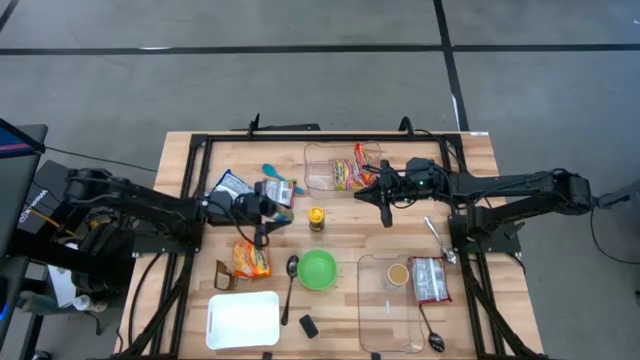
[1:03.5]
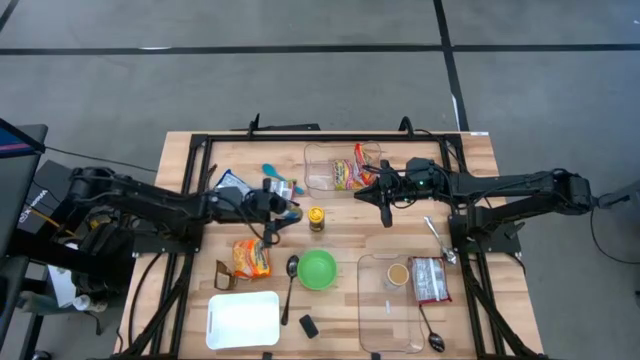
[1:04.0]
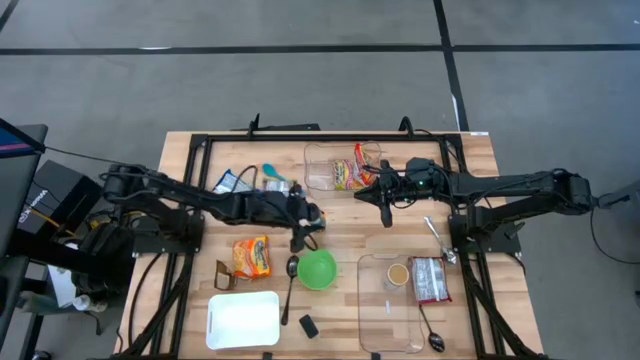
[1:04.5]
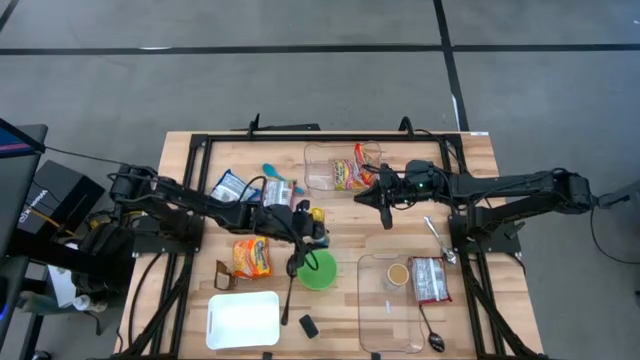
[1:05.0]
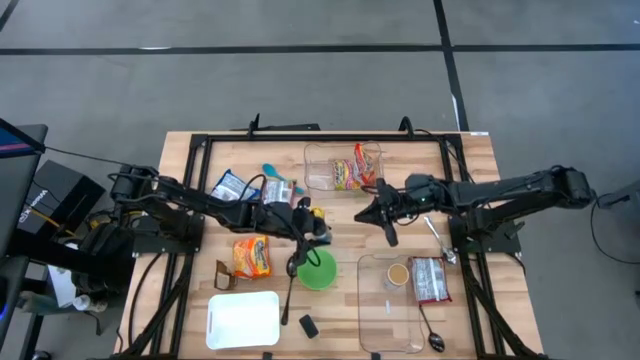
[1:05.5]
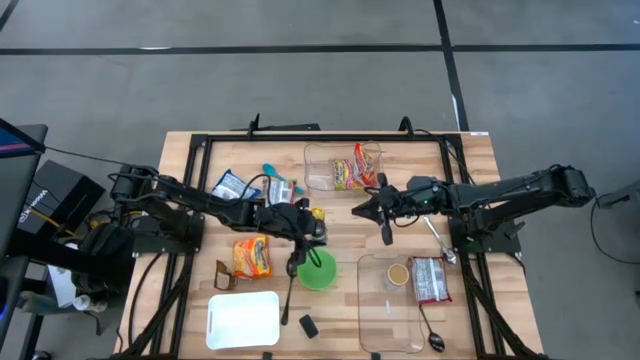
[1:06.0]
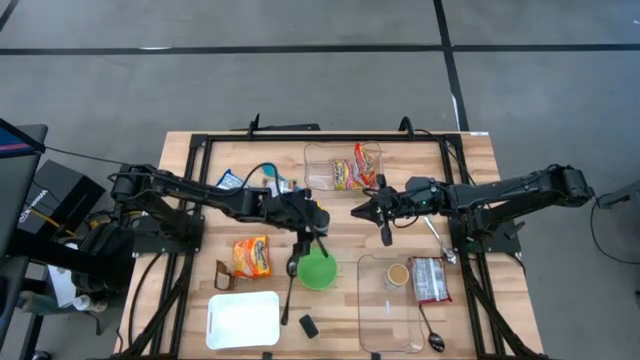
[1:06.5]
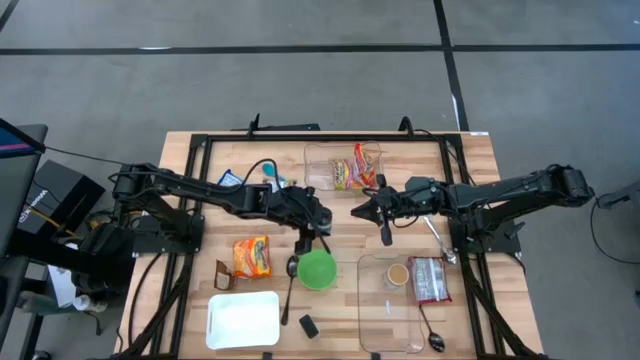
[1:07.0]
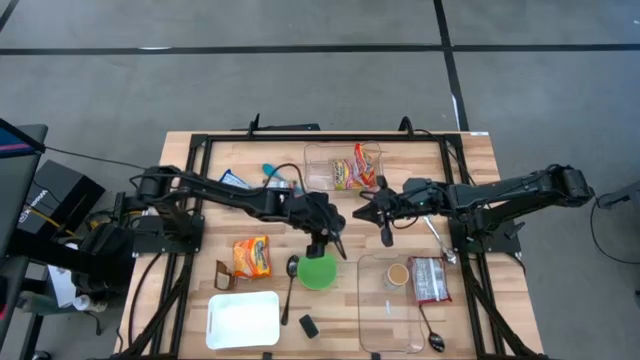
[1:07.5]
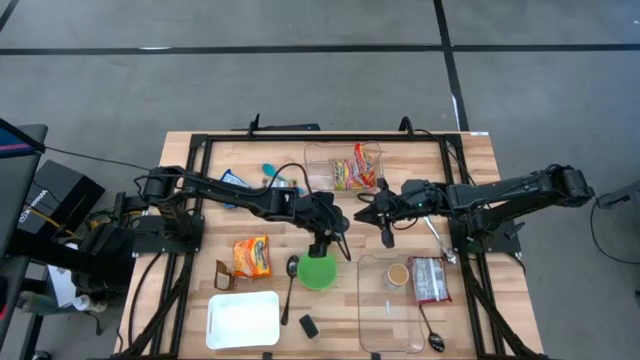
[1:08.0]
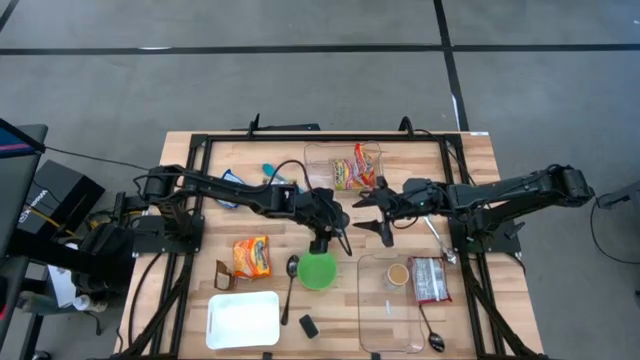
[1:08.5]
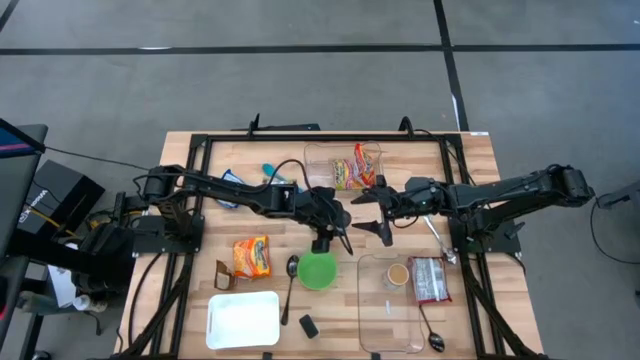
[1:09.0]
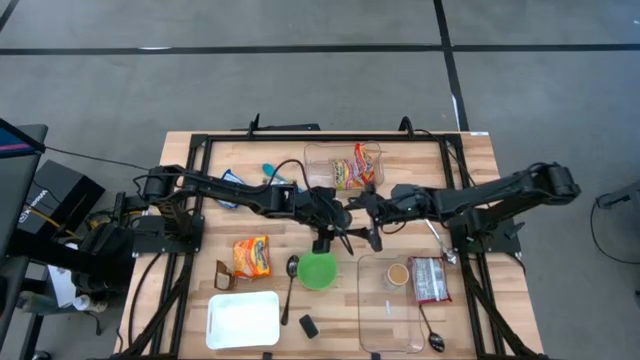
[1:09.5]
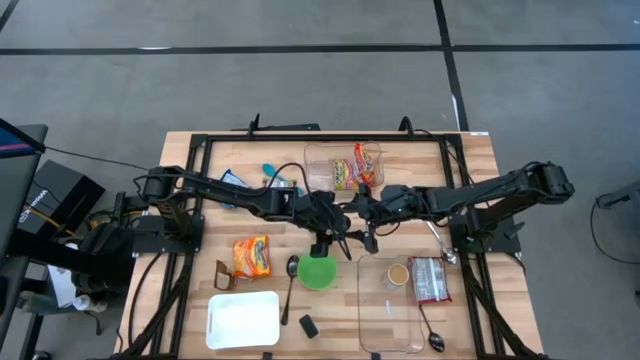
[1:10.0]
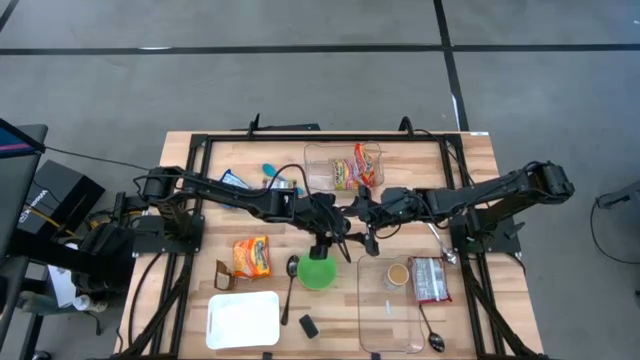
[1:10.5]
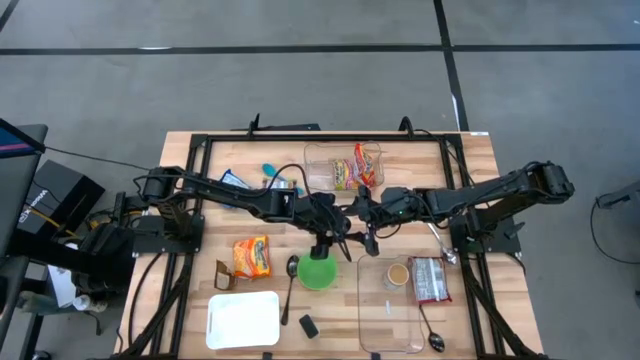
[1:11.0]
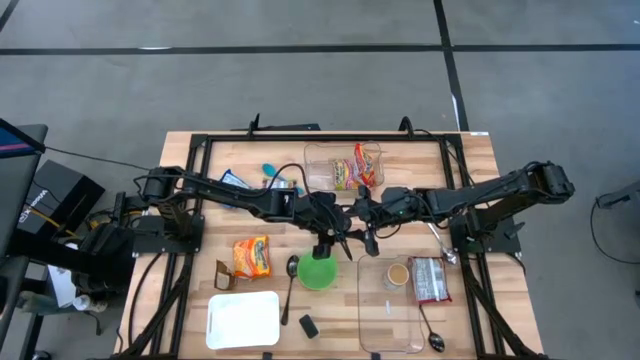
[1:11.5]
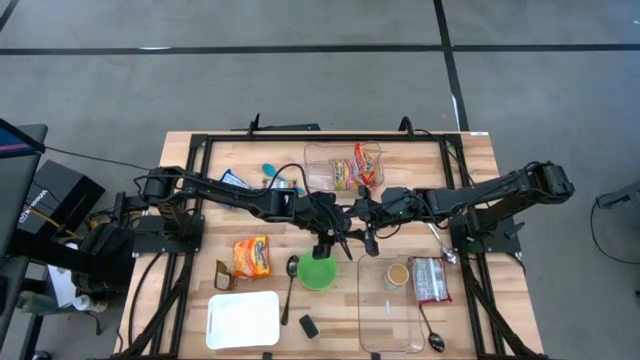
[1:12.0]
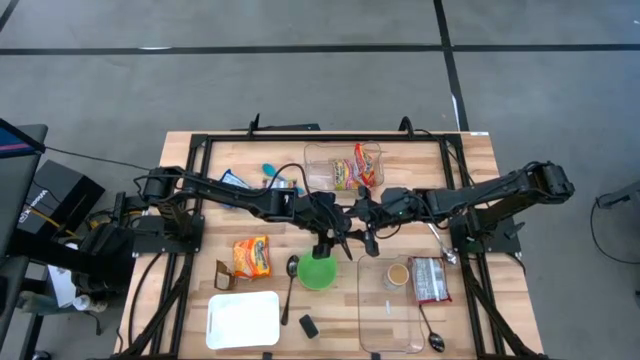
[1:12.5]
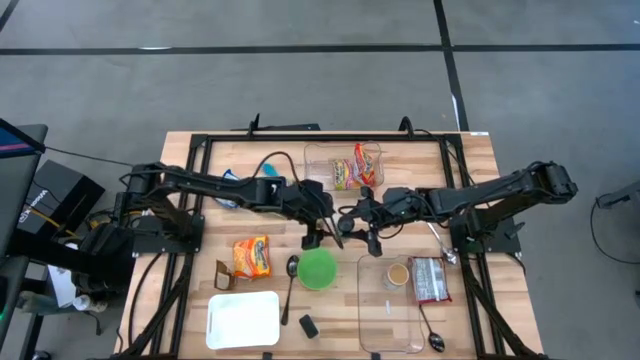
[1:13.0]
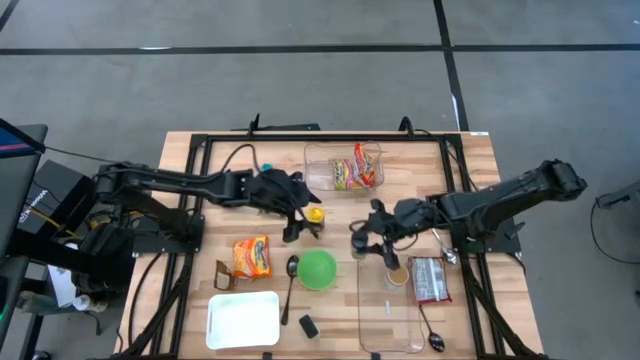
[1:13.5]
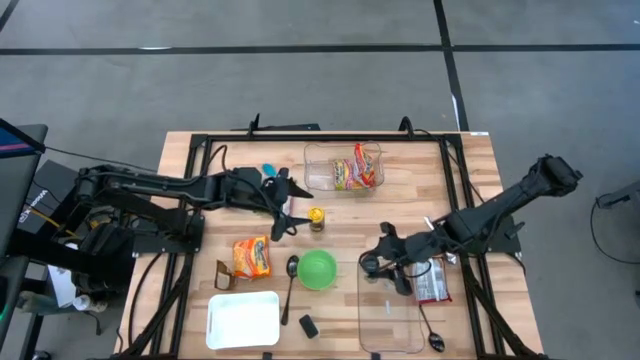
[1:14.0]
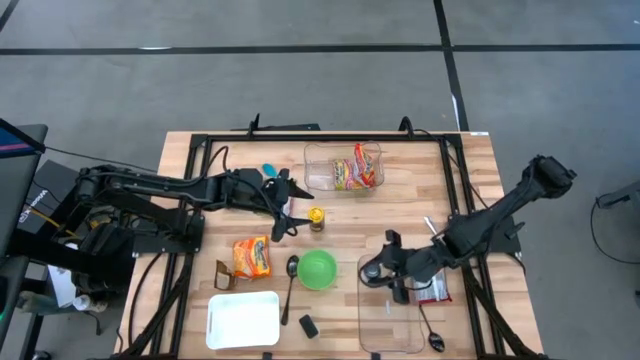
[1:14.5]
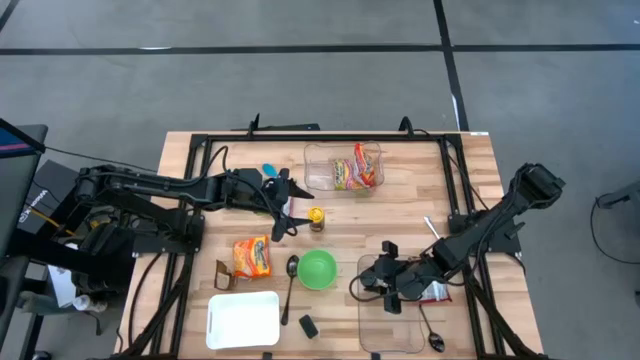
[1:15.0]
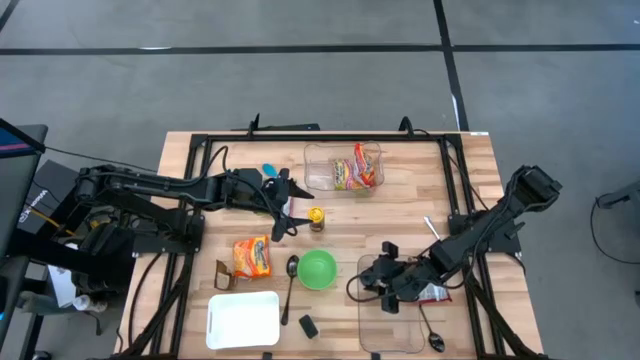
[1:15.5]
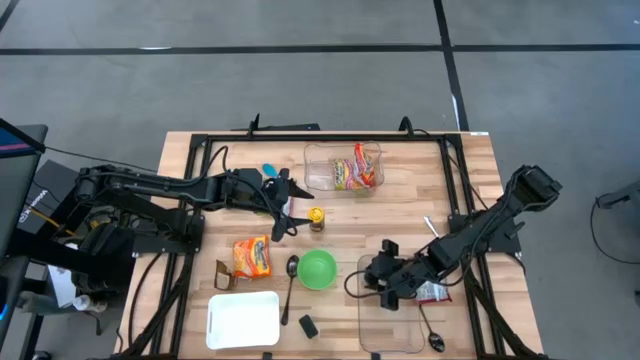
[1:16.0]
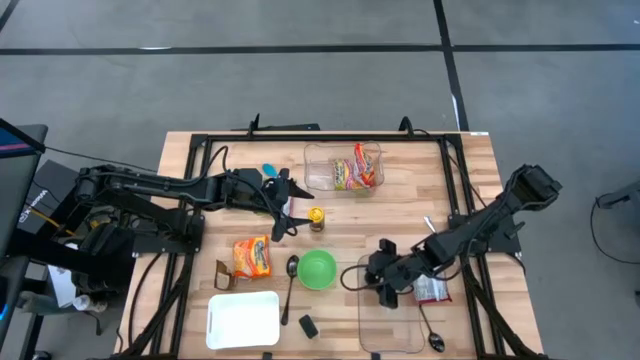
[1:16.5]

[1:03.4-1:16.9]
Task: Pick & Place Food Item
Put the brown and blue seasoning into the bottom transparent bin

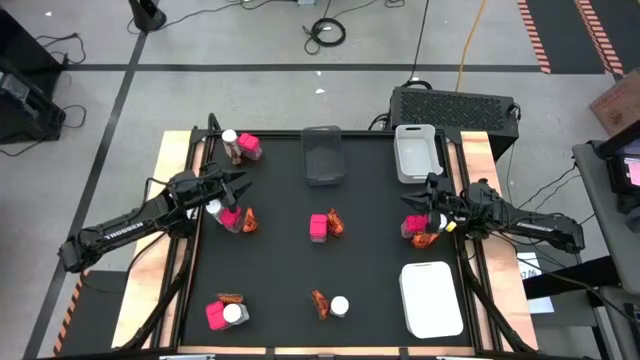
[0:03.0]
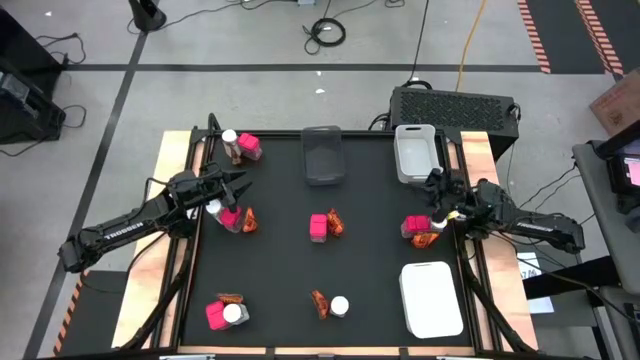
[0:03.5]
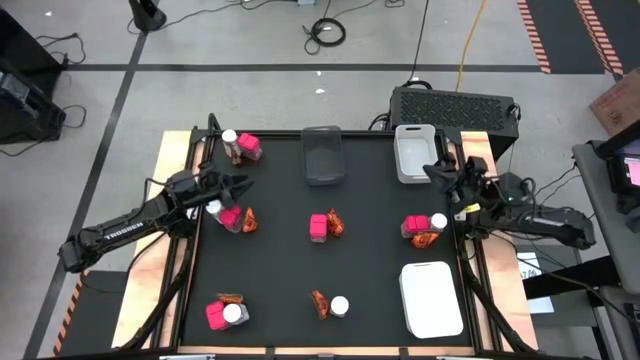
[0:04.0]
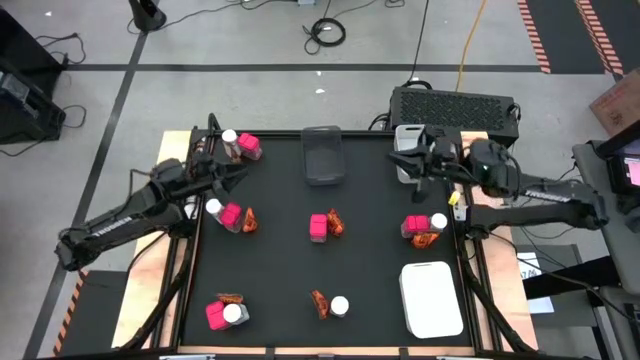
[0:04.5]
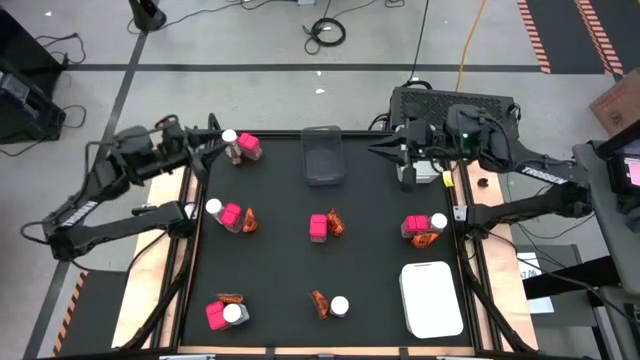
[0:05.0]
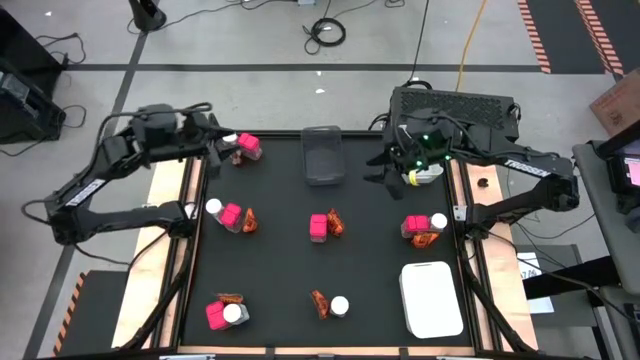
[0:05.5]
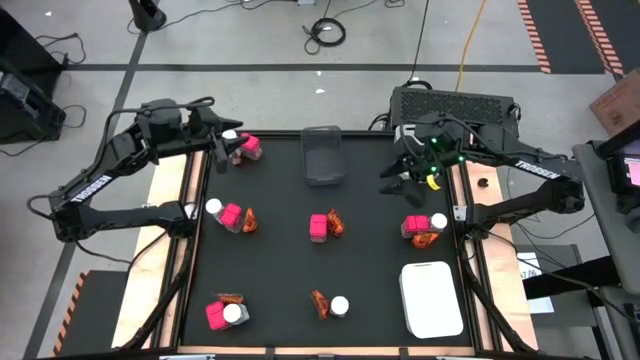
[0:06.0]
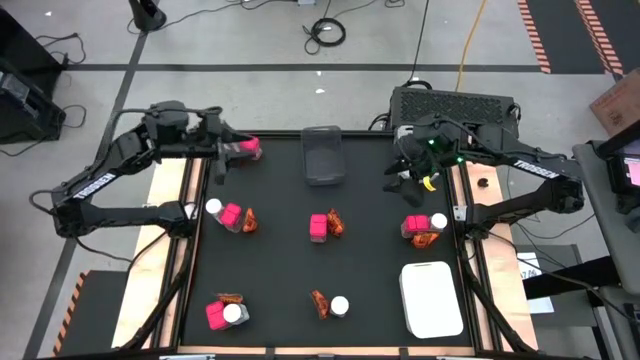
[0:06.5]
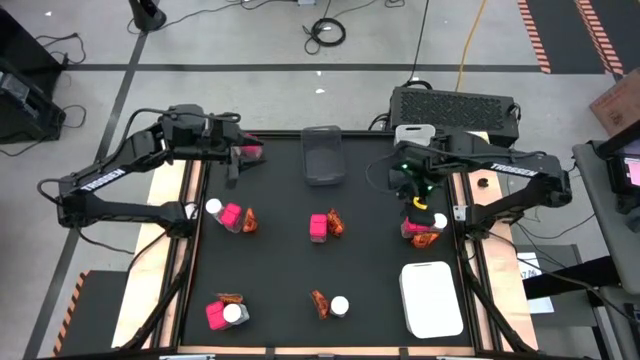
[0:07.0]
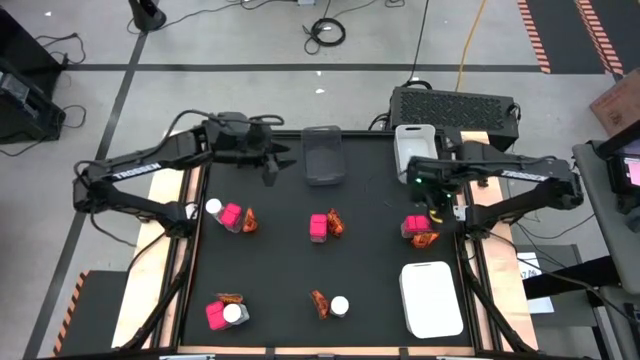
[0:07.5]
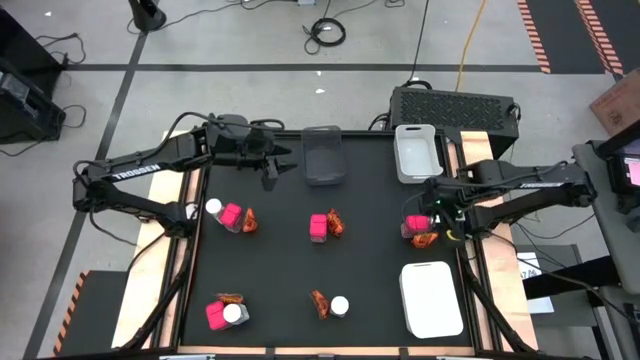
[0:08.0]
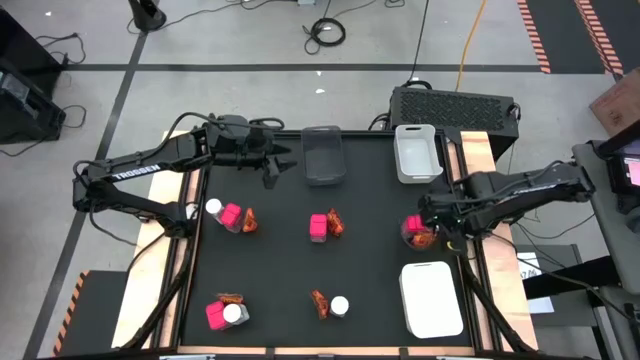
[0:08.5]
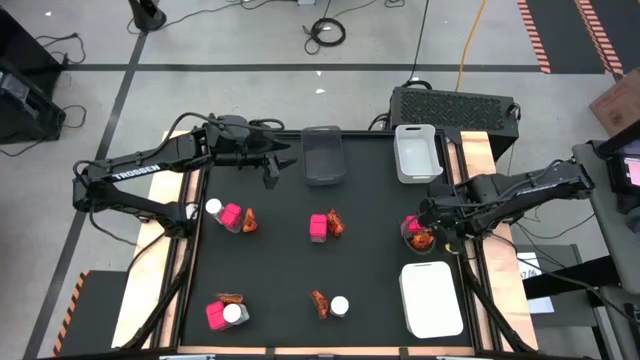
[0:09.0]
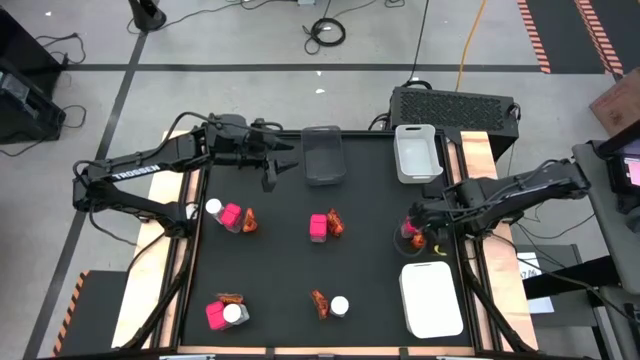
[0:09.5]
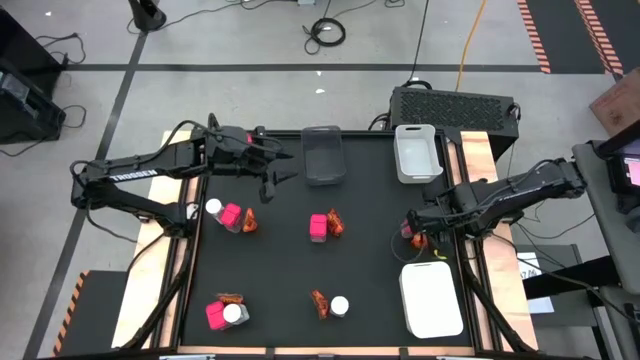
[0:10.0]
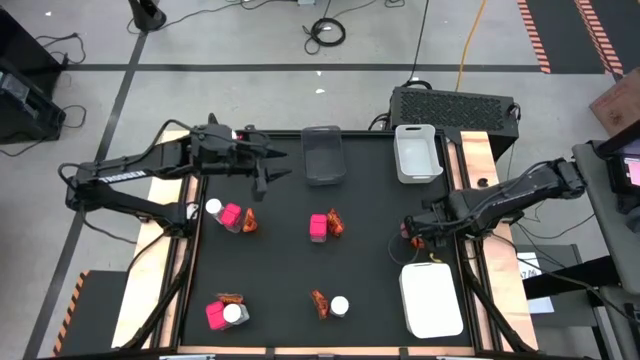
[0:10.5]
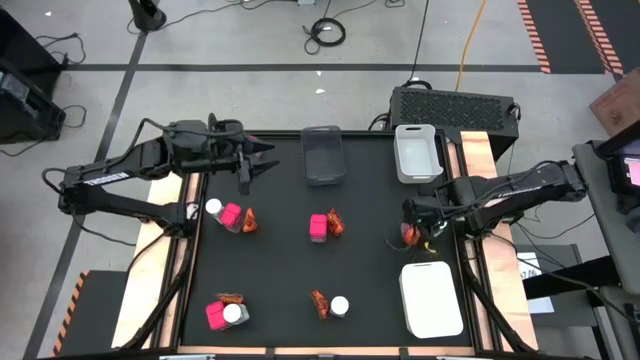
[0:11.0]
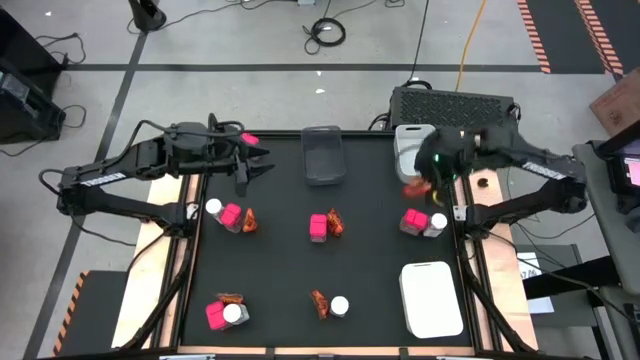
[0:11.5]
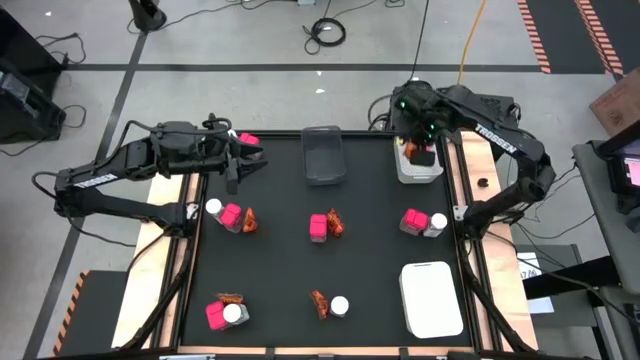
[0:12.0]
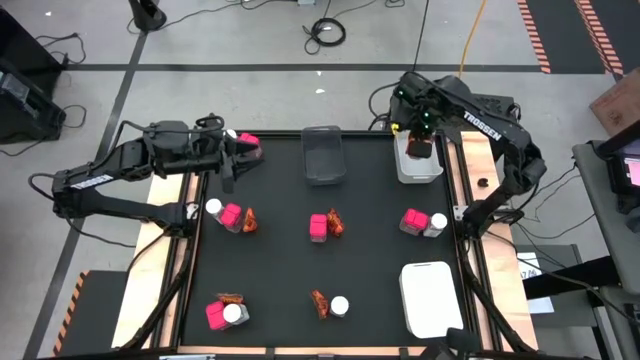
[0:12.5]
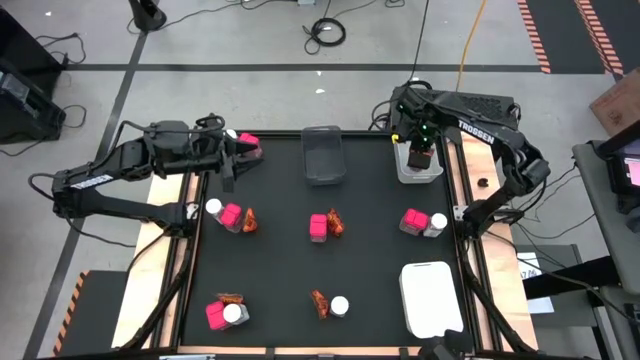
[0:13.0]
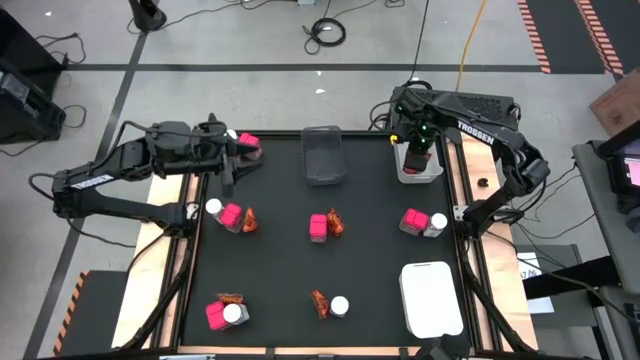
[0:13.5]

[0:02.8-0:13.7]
Task: Sort spices by type
Put the orange seasoning pack into the top white bin
